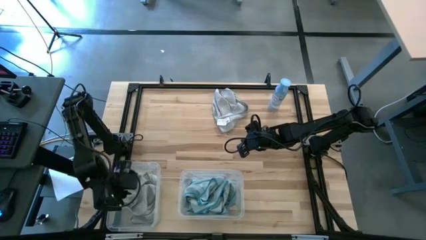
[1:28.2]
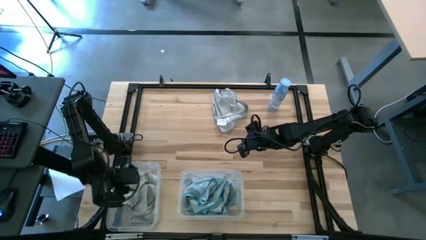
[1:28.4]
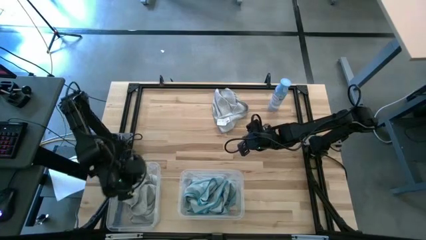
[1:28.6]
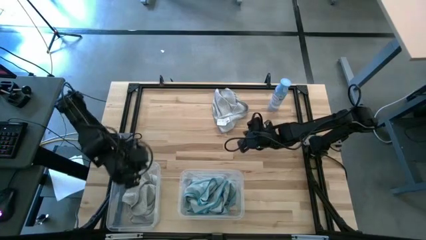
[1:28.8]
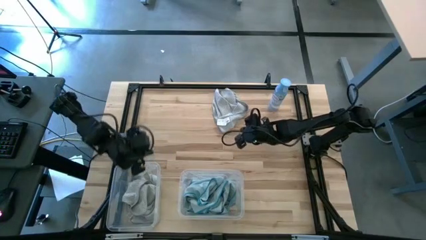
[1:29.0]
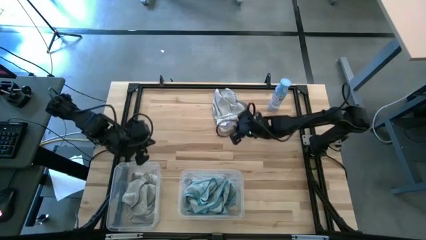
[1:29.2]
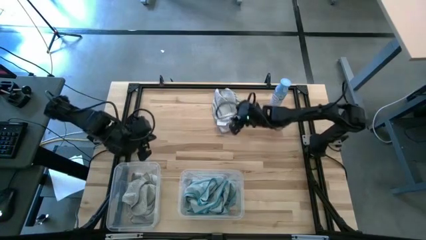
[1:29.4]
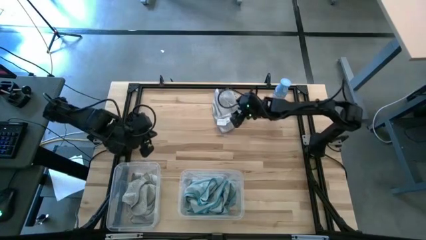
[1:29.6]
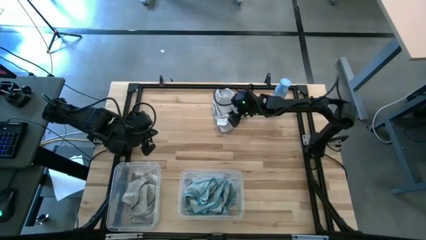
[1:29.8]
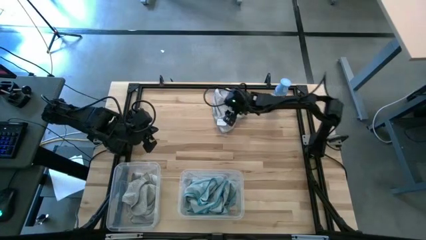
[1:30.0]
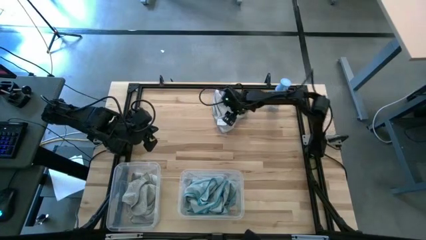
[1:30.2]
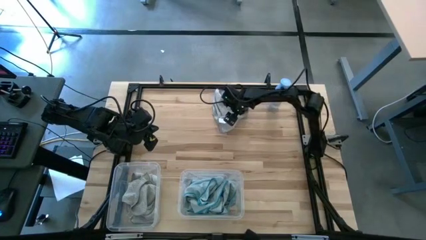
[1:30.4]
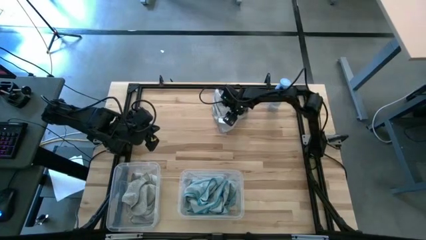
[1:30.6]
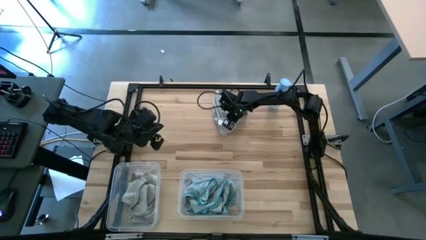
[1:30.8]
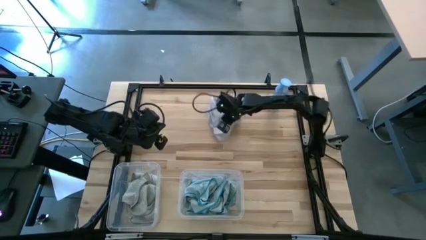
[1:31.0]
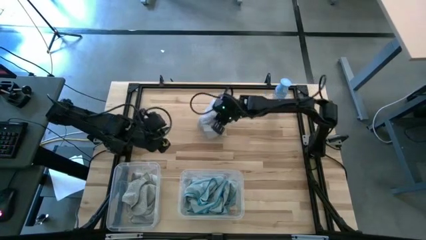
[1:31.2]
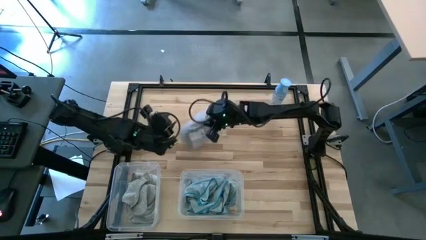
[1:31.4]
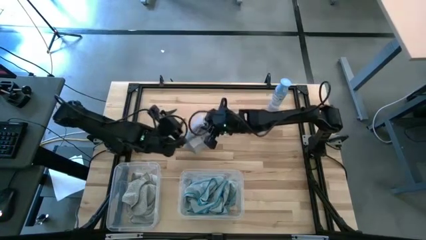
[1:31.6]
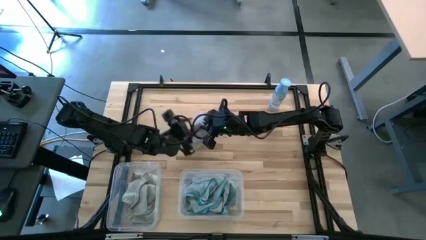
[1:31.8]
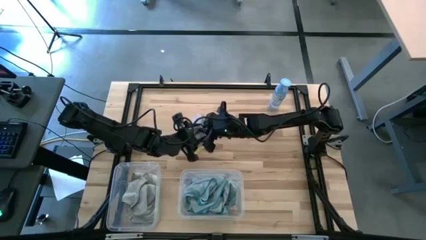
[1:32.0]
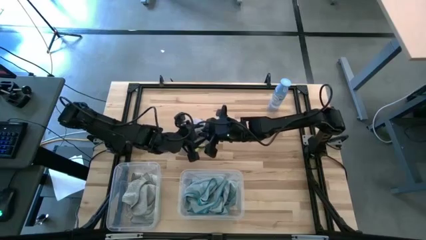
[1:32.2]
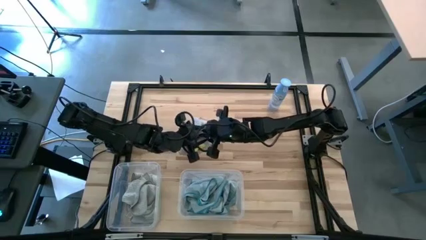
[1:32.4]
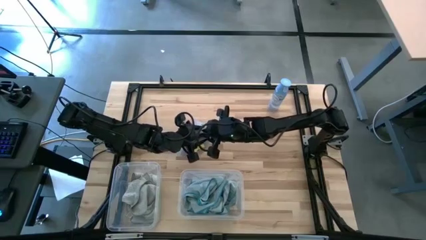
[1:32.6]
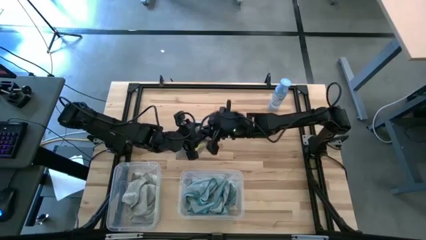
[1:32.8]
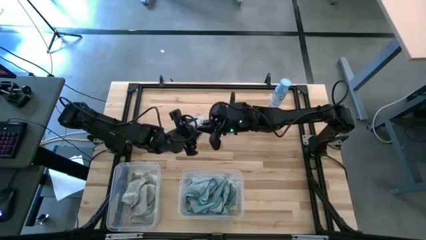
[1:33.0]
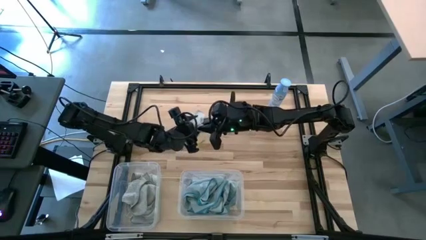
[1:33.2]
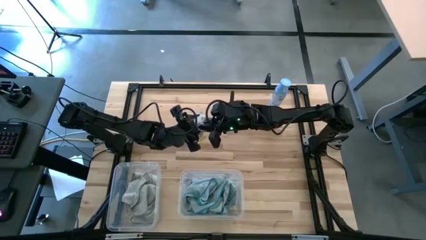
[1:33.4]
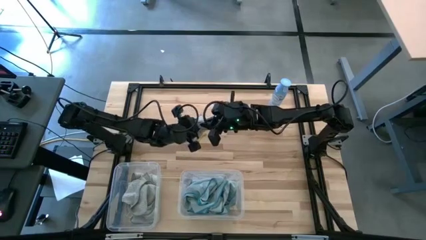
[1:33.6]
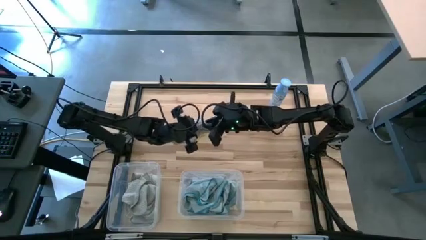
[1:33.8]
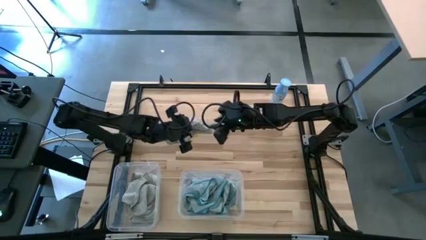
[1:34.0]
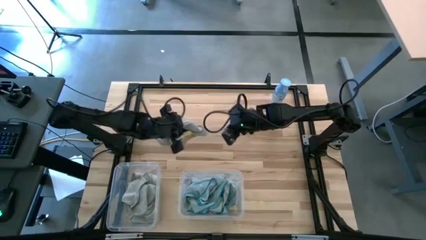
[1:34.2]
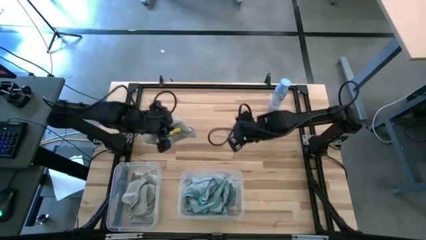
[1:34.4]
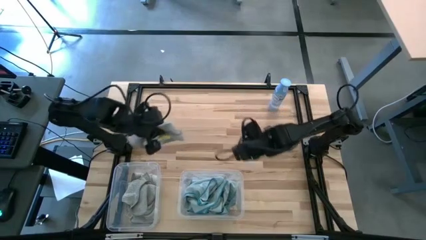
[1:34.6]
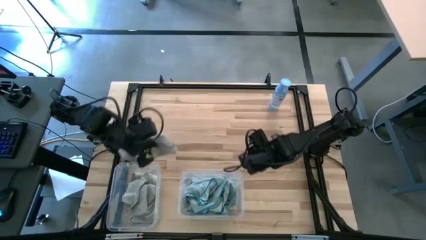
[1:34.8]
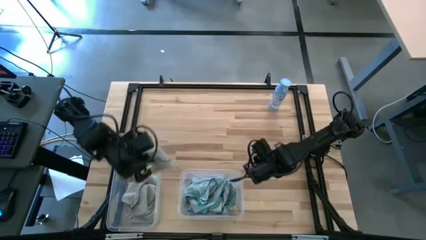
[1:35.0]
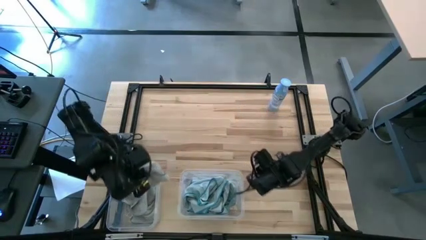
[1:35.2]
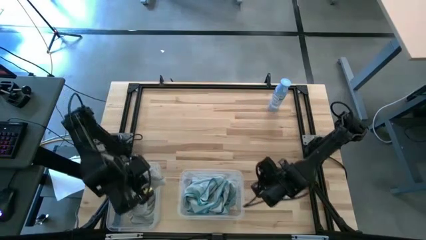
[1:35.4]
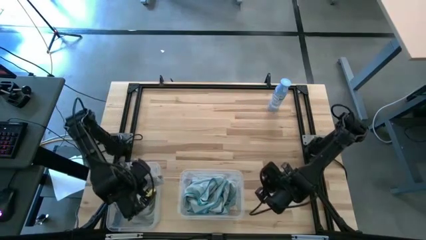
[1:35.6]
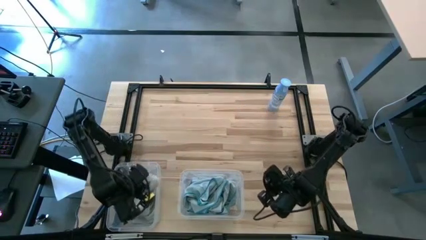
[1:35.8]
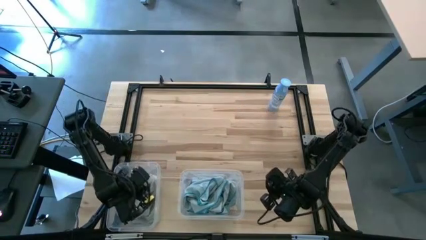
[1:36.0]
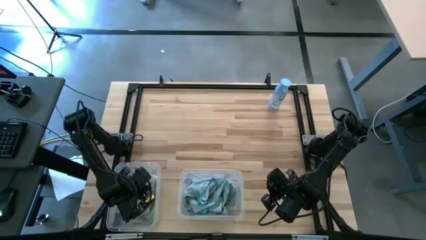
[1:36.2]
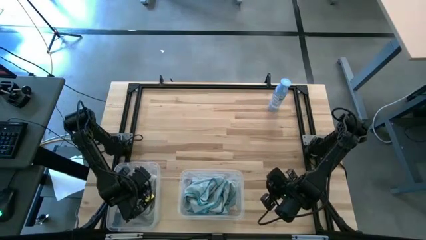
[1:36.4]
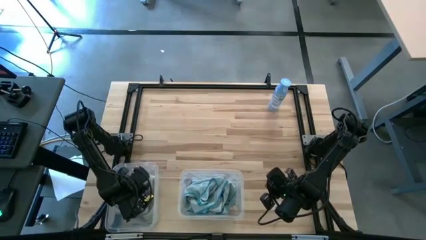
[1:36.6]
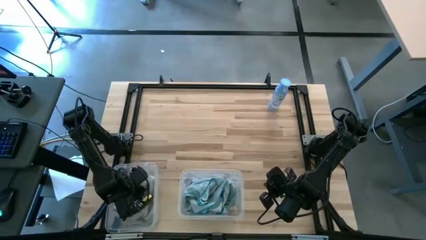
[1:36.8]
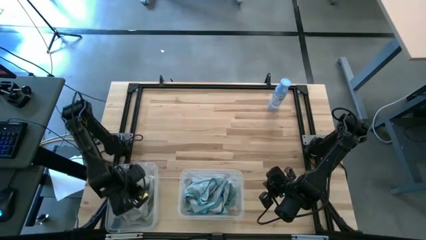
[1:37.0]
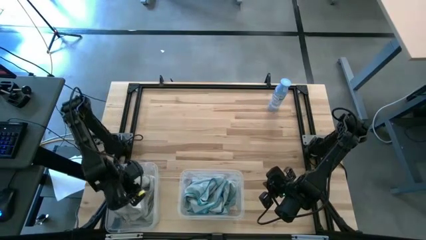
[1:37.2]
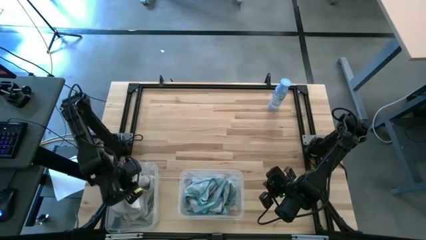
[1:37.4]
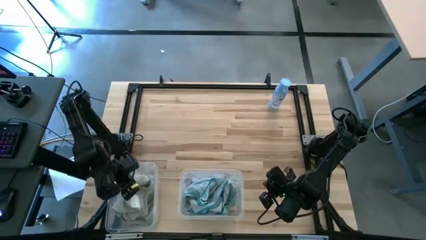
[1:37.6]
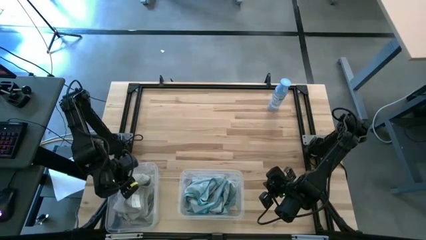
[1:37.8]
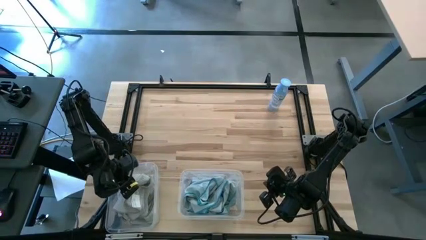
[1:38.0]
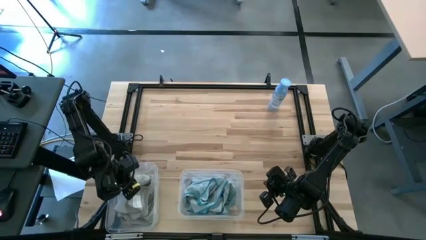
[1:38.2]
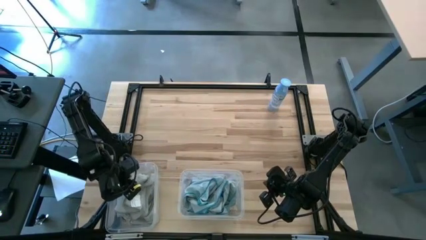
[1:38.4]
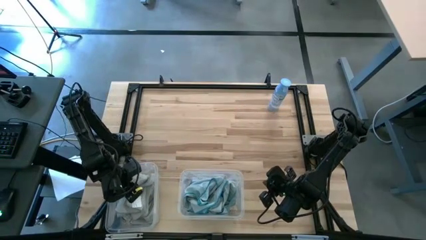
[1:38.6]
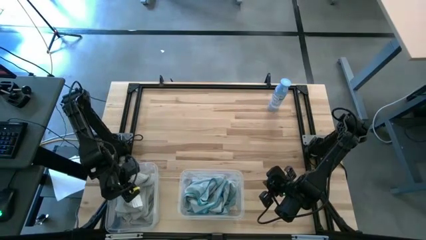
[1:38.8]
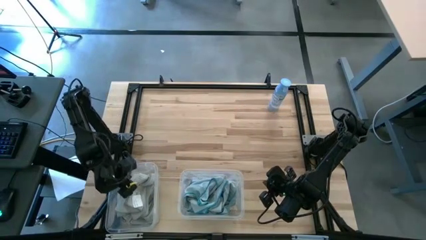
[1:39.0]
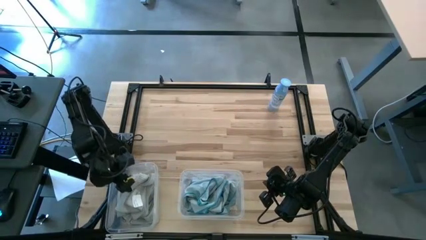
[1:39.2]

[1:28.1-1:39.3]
Task: Sort microfiber towel by color & place in baskets
Put the grey towel into the left transparent bin

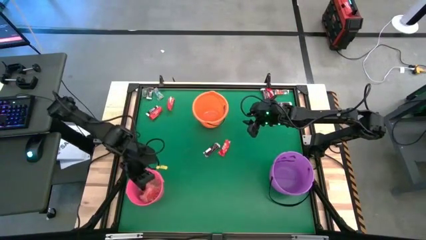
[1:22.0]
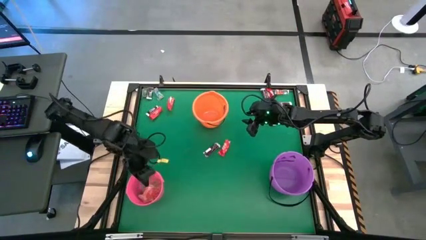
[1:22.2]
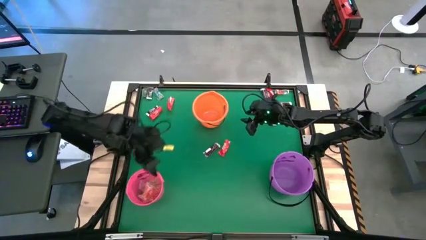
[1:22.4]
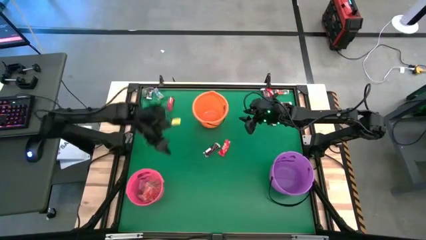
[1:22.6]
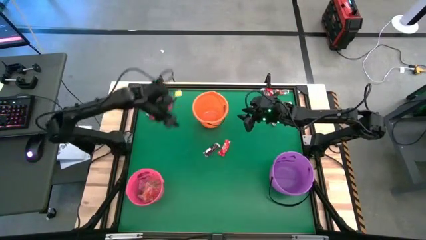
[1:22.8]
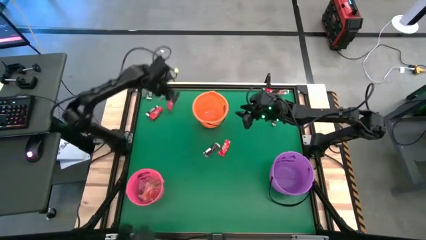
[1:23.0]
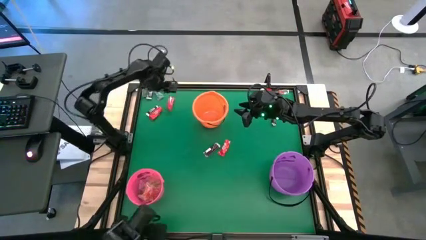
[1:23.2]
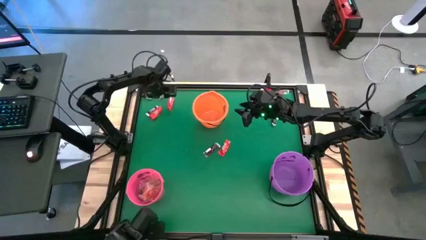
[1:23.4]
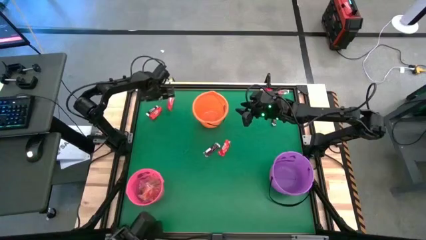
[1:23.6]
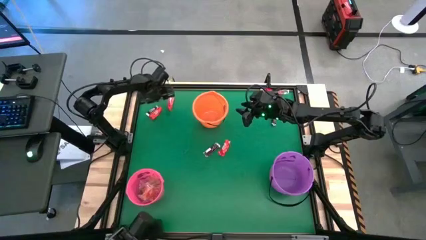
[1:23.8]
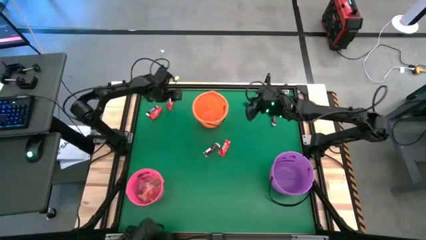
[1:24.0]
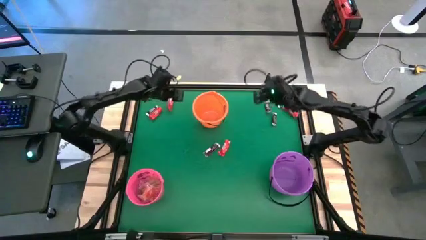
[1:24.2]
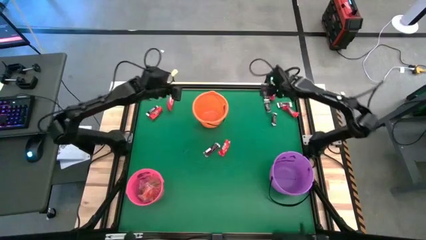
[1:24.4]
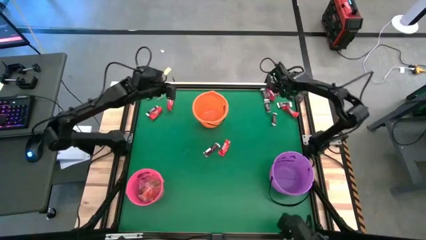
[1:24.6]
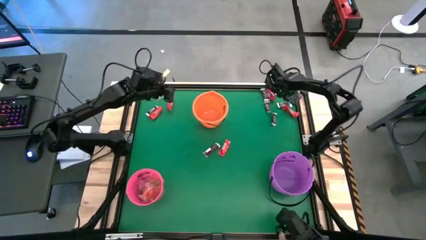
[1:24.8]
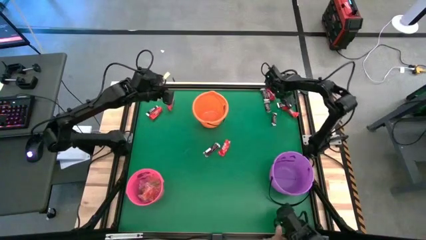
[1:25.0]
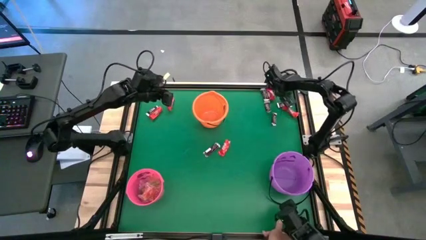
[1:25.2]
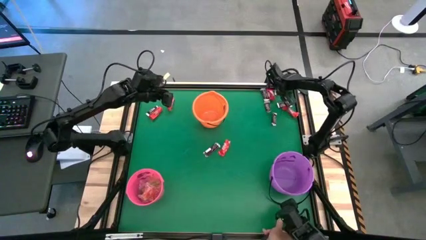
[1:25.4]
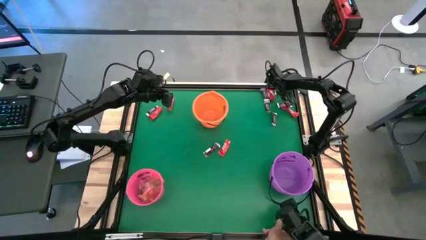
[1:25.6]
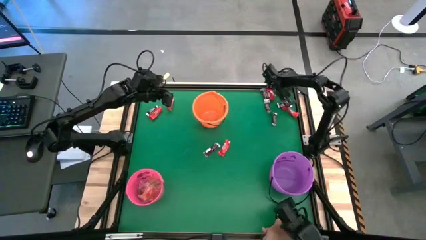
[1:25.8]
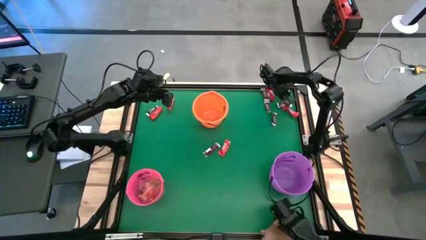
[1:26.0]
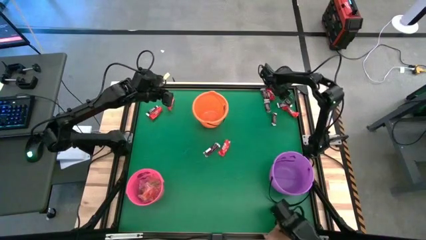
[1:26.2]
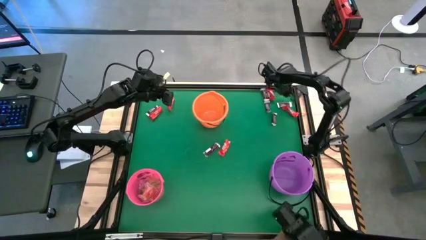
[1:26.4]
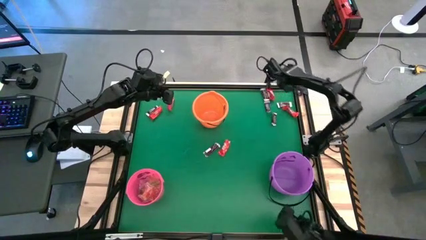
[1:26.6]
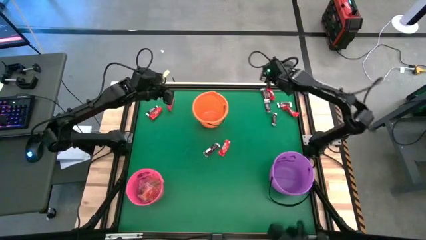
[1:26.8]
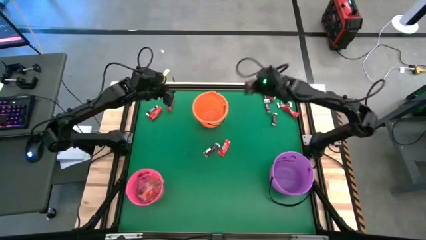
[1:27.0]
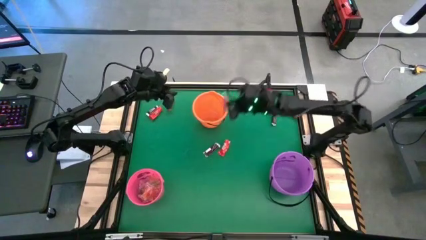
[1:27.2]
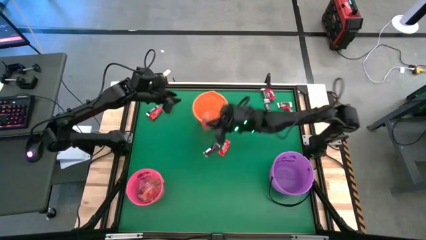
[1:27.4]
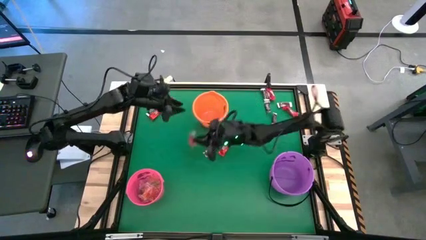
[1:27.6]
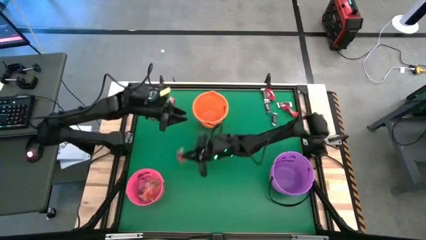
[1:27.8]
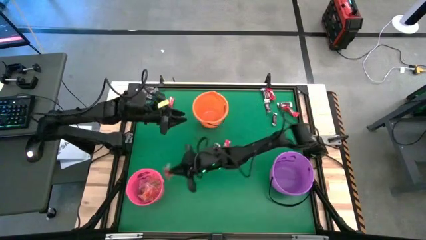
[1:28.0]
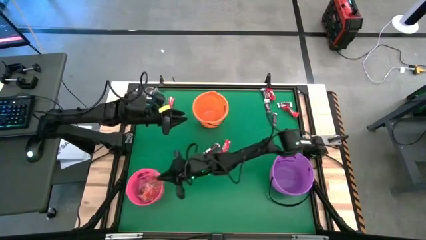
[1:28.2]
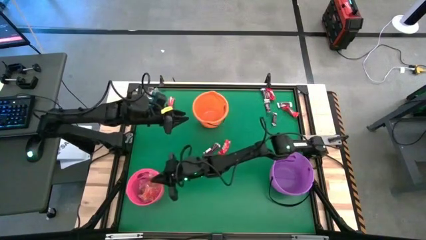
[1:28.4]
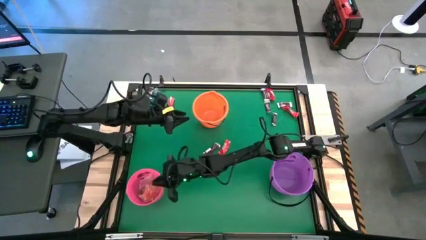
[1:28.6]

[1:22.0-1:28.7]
Task: Sort candy by brand, put in halloween buckets
Put the red gummy into the pink bucket
